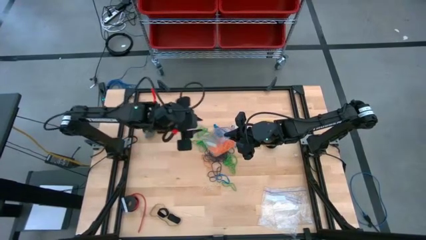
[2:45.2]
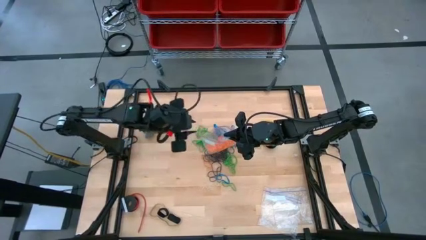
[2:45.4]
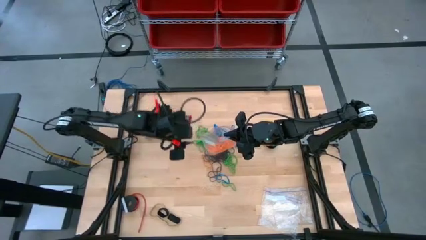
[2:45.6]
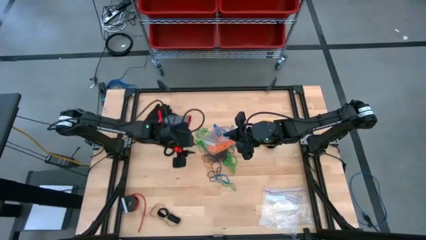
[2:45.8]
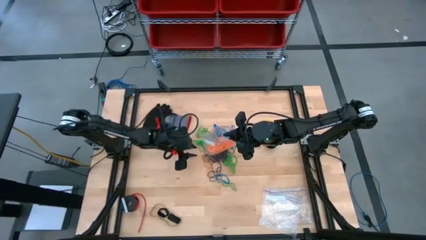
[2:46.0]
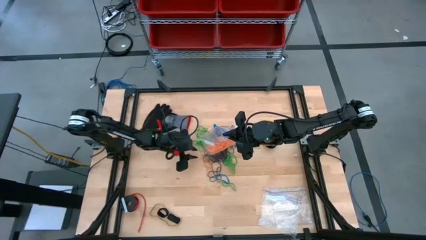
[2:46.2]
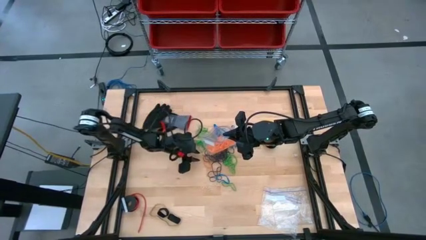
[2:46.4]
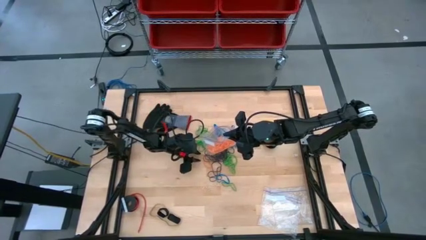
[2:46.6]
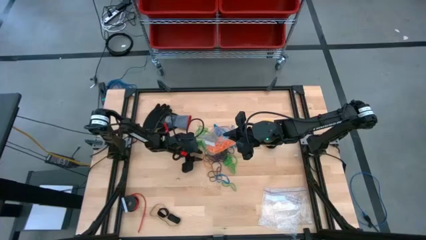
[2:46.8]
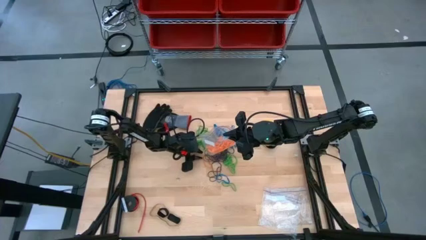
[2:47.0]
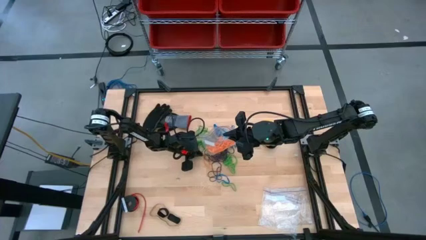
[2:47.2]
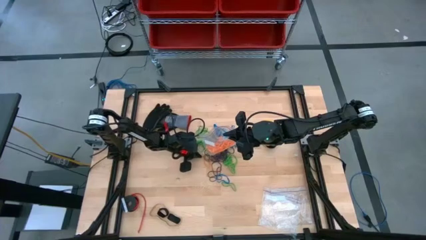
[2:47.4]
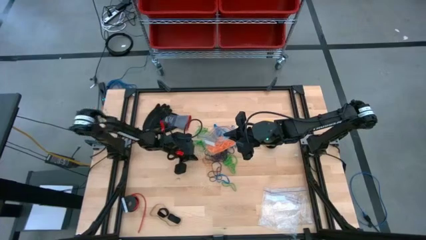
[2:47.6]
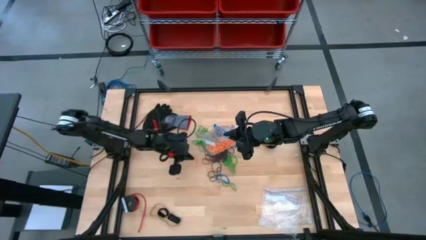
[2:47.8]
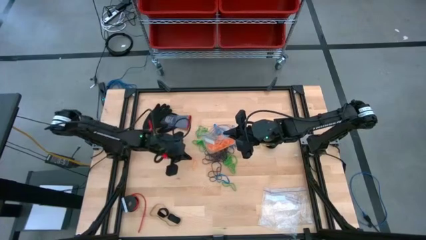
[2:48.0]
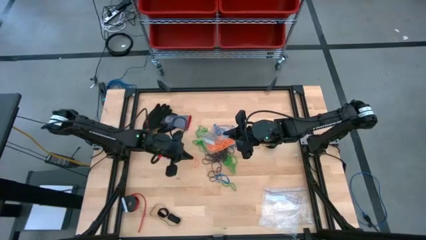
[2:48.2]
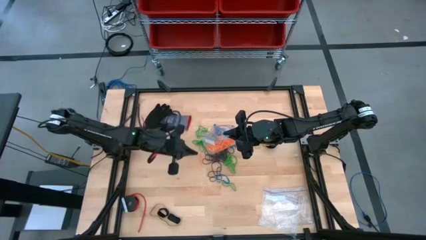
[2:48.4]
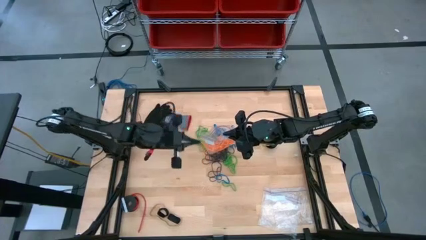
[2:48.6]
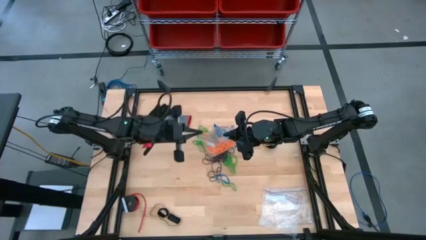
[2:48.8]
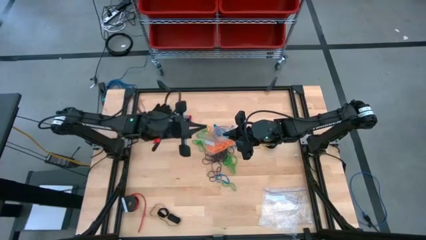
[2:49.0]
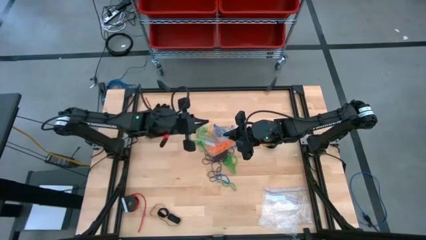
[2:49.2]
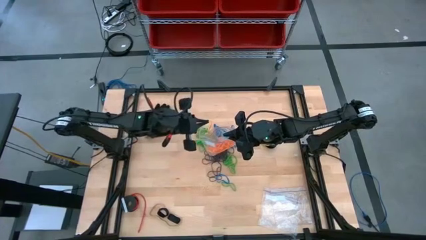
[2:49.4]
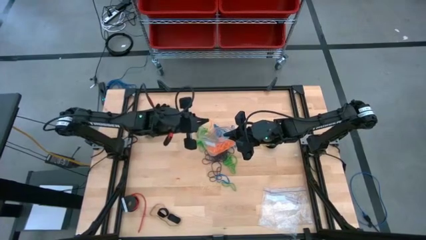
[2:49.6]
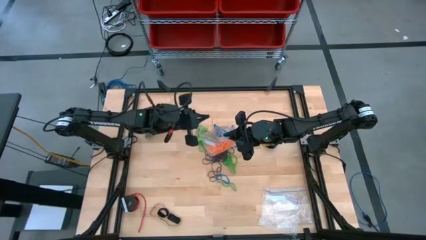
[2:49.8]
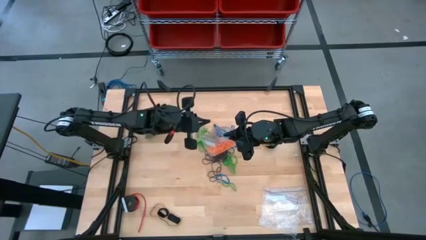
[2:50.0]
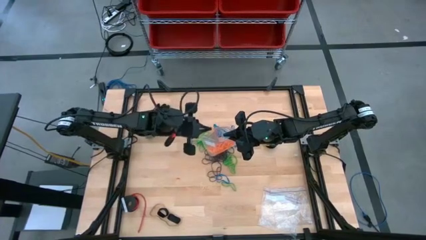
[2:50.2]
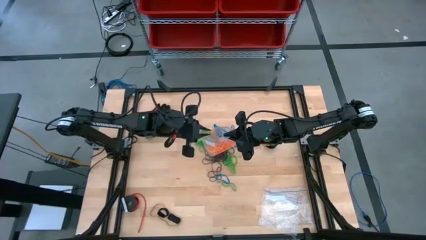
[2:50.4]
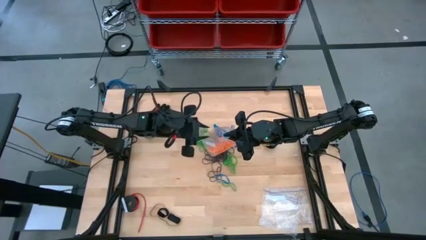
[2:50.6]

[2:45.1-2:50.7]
Task: Sort rubber bands
Put the orange rubber band into the transparent zip bag

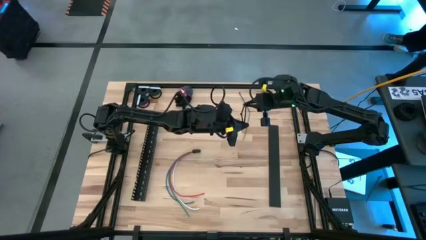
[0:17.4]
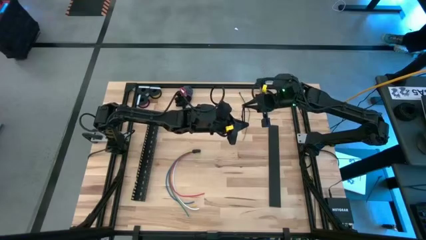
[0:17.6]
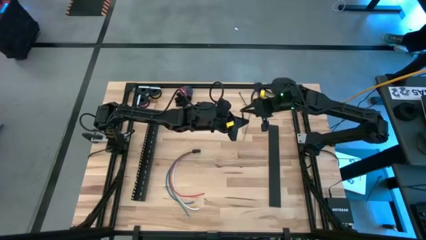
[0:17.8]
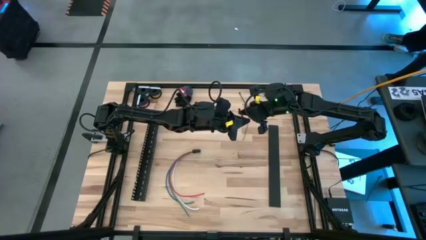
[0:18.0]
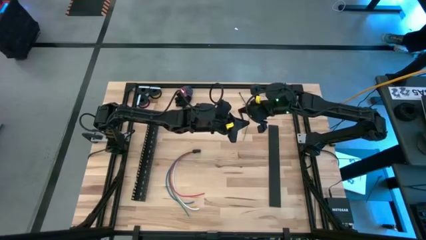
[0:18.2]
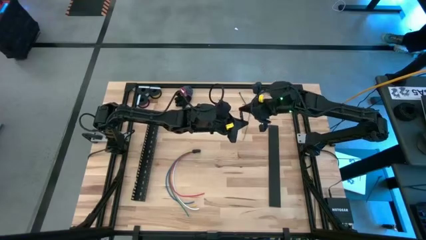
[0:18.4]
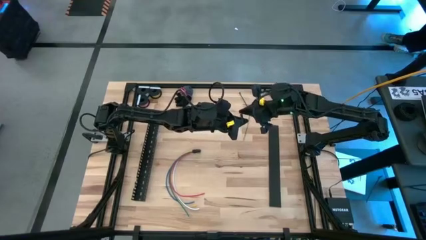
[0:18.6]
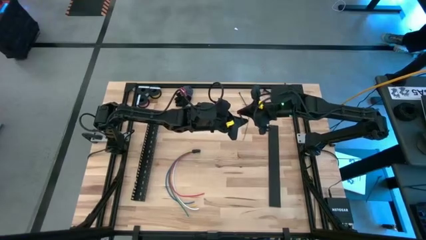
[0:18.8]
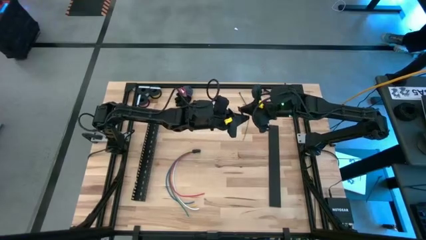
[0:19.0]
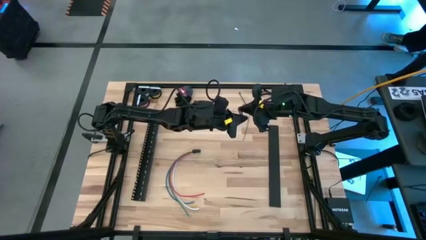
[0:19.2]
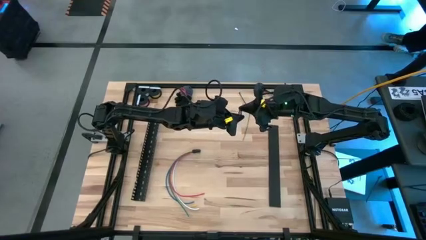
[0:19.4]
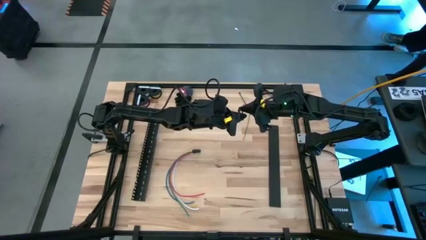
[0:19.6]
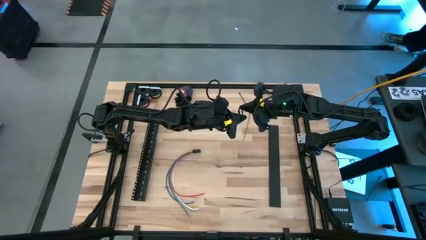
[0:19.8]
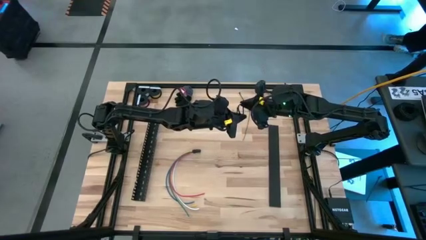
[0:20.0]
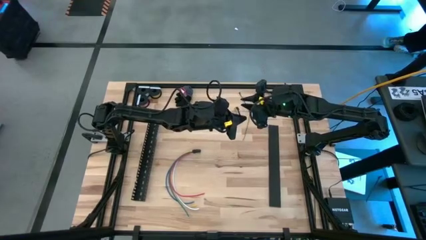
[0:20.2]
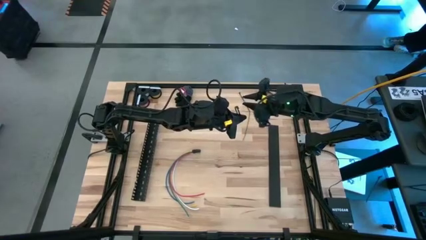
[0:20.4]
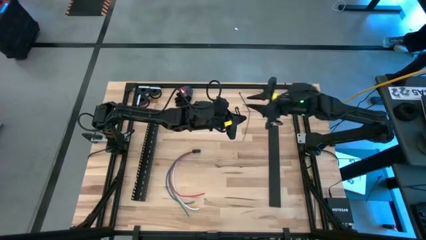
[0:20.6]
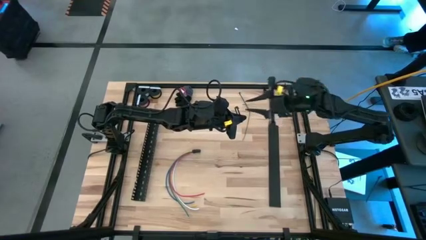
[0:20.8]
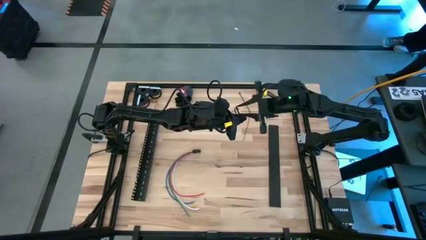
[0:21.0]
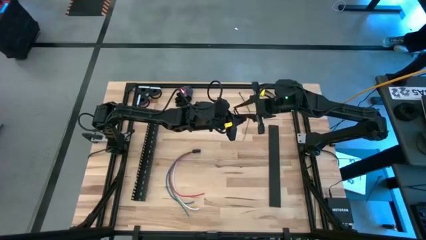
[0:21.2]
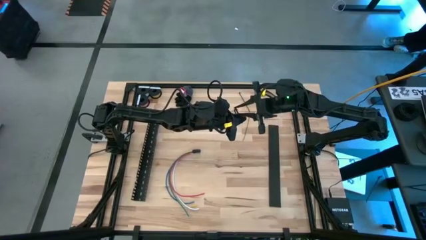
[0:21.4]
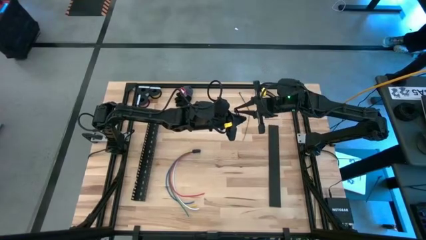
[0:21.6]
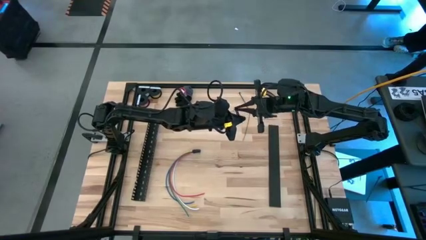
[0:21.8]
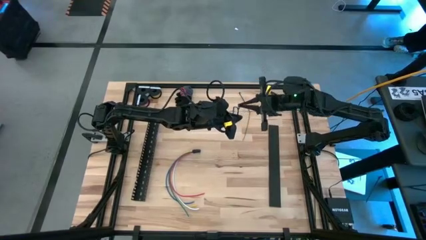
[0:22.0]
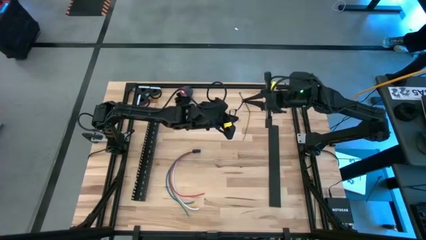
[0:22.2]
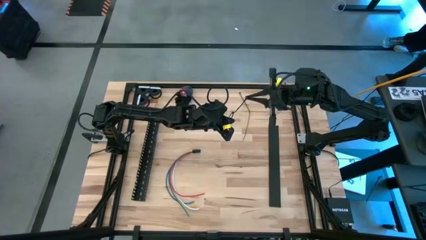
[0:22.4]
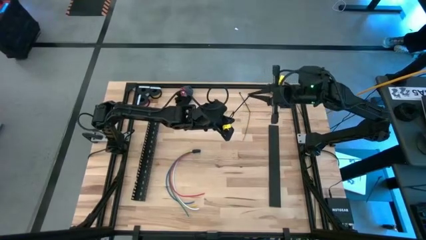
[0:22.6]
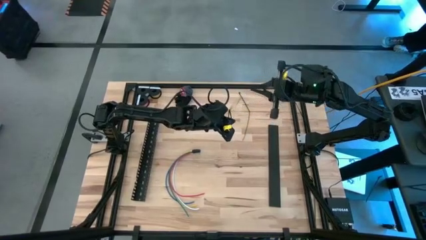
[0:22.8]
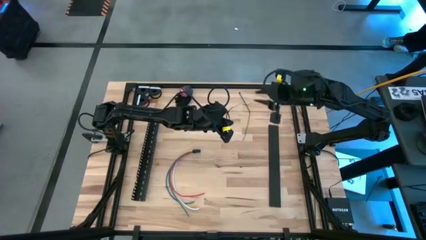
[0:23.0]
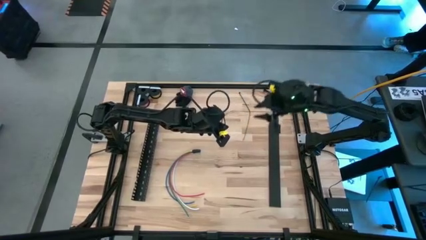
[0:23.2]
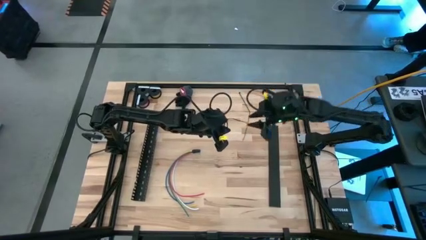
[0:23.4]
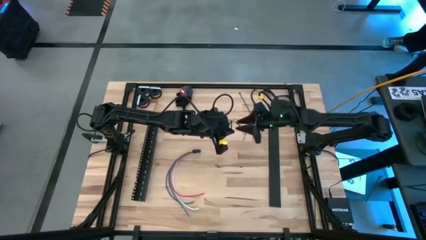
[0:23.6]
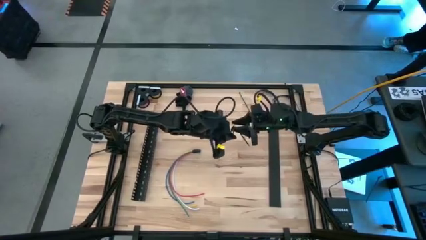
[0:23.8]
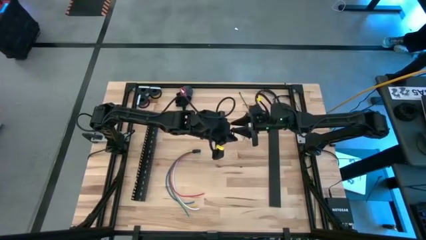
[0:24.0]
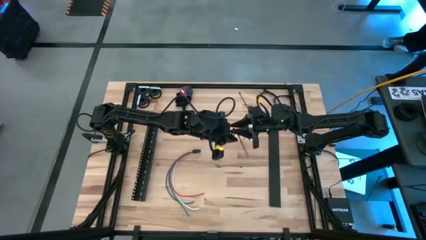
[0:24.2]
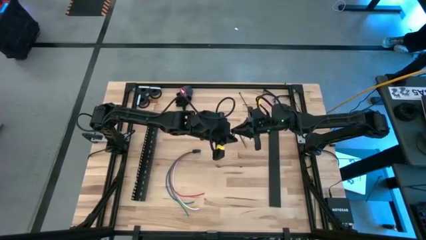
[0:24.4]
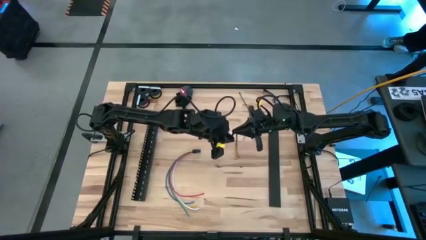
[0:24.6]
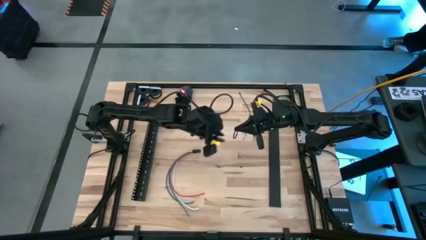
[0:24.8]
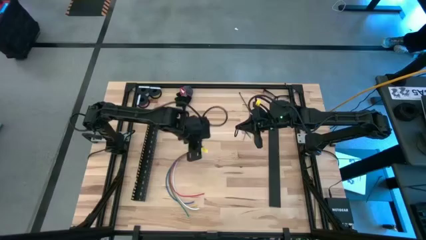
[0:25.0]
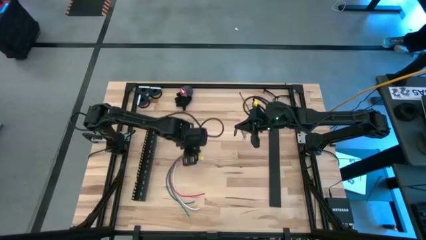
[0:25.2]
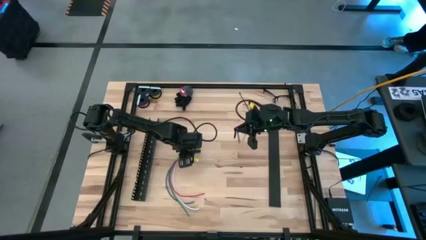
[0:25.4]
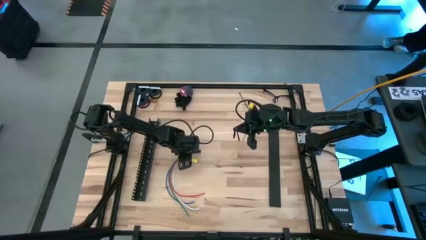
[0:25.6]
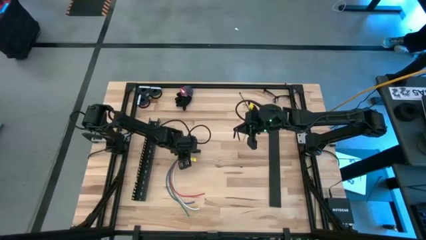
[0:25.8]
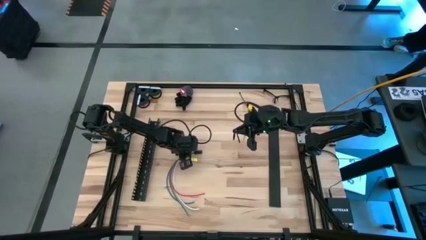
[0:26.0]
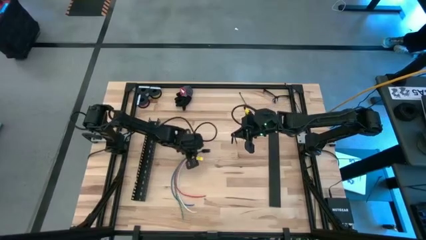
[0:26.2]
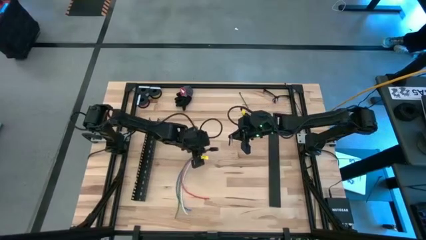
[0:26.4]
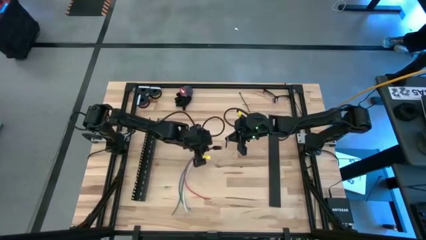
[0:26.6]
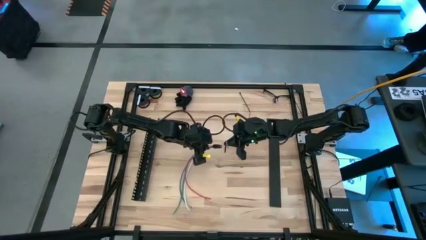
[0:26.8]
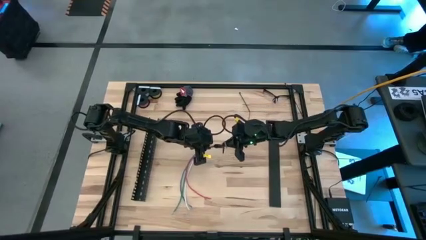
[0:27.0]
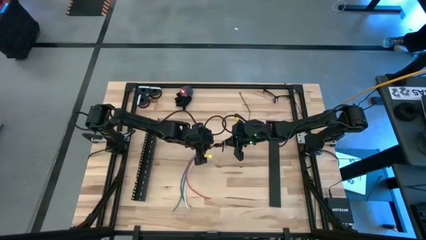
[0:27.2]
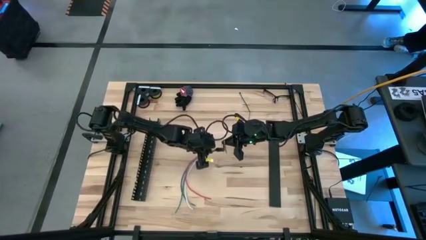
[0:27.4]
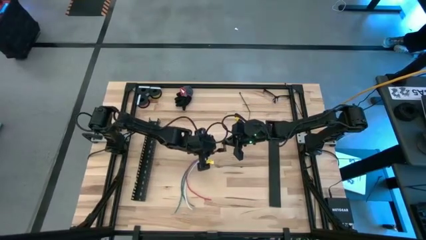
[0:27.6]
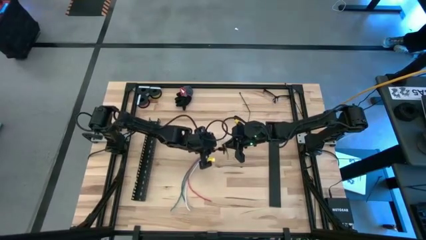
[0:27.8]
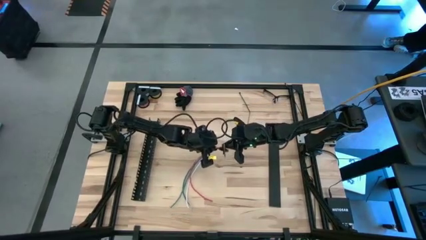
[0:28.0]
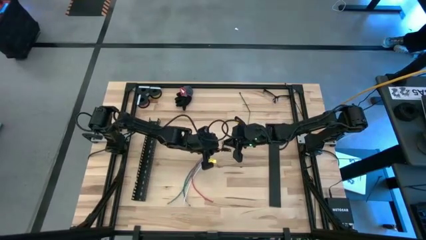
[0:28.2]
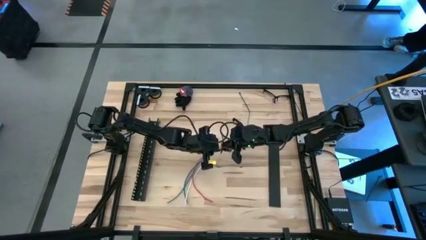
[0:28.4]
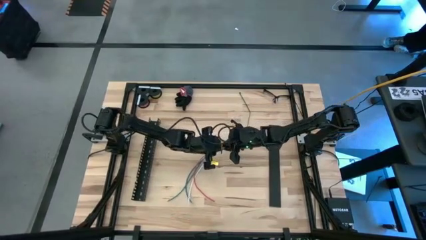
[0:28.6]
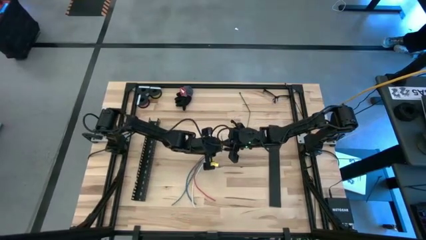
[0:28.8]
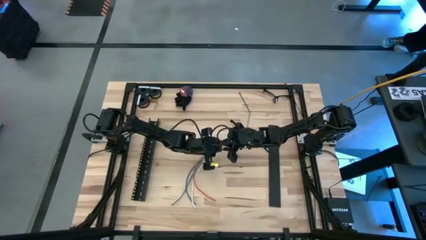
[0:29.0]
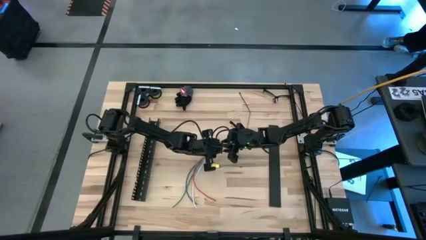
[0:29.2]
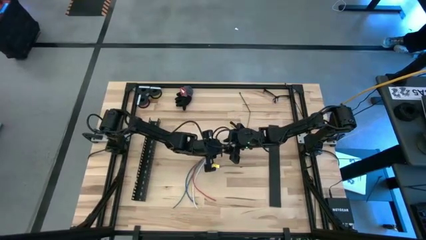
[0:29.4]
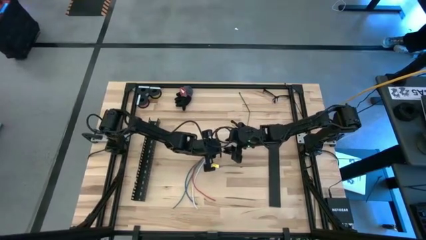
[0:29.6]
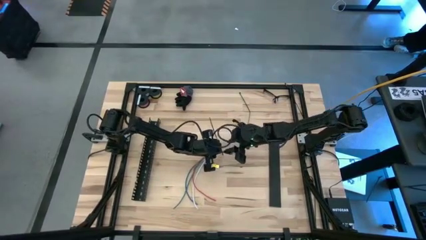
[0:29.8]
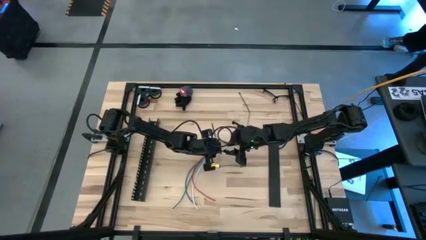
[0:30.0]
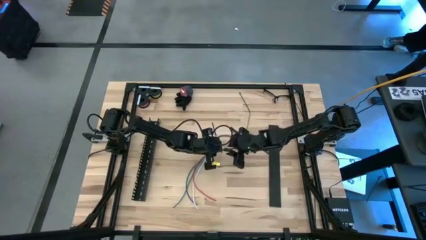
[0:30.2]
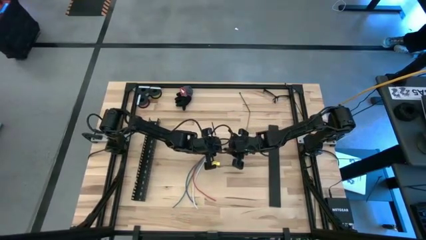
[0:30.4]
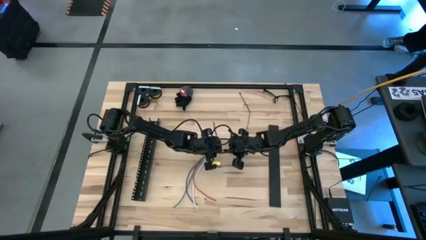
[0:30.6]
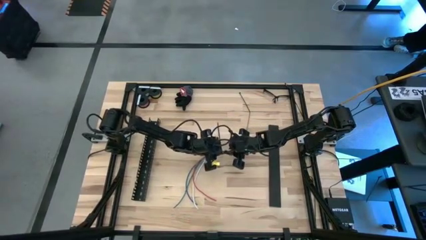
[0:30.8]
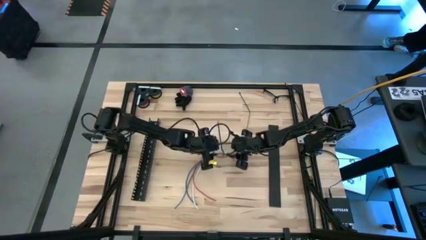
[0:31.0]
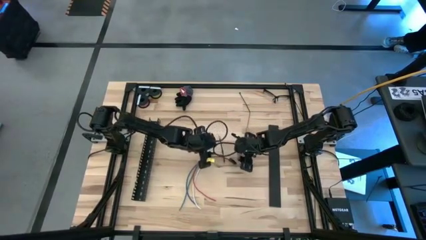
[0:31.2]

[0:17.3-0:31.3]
Task: Ziptie cables
Wrap the cable wires with the black zip tie
